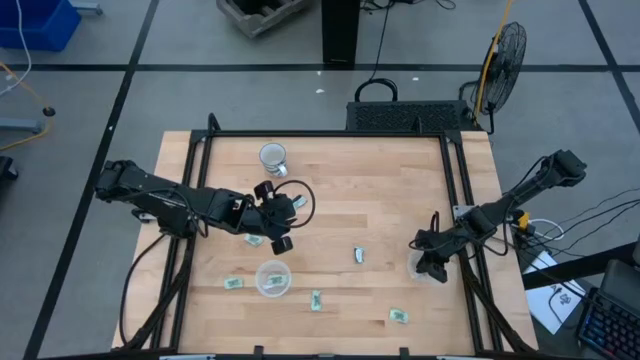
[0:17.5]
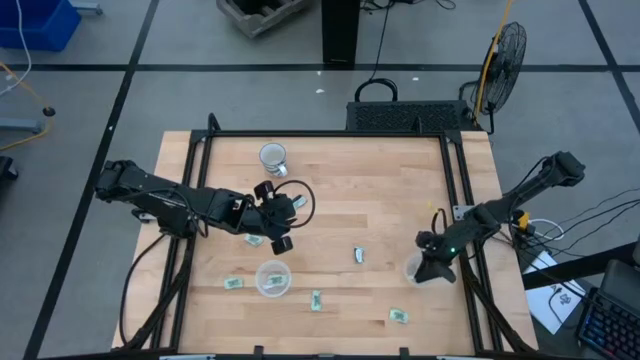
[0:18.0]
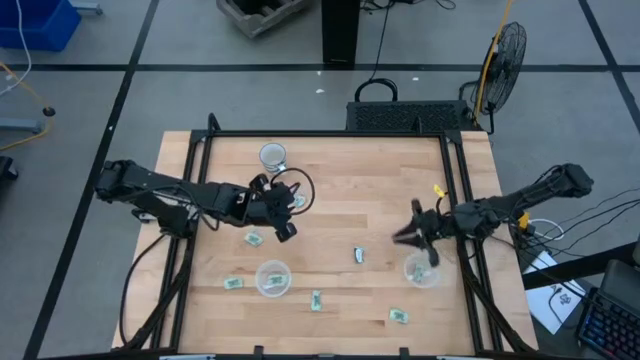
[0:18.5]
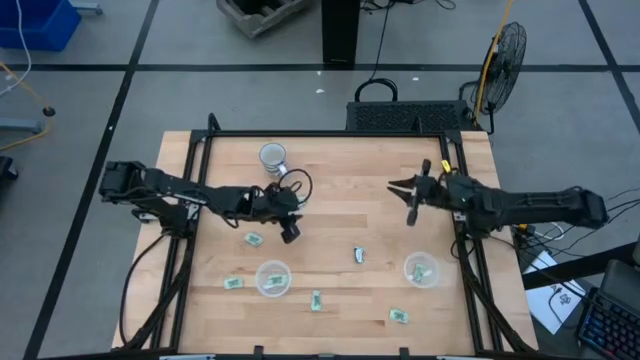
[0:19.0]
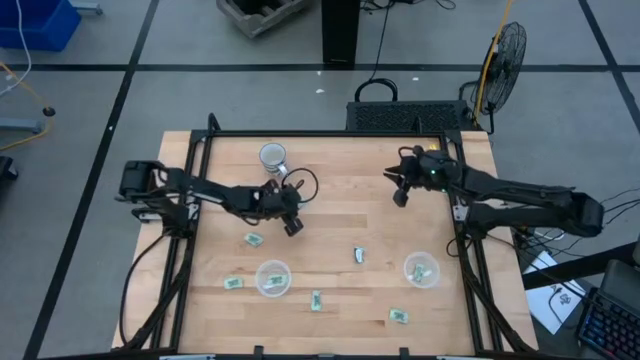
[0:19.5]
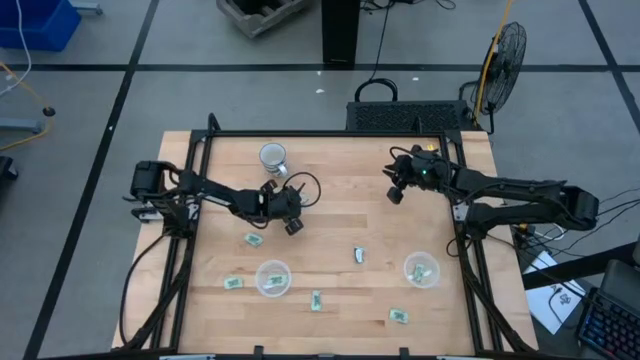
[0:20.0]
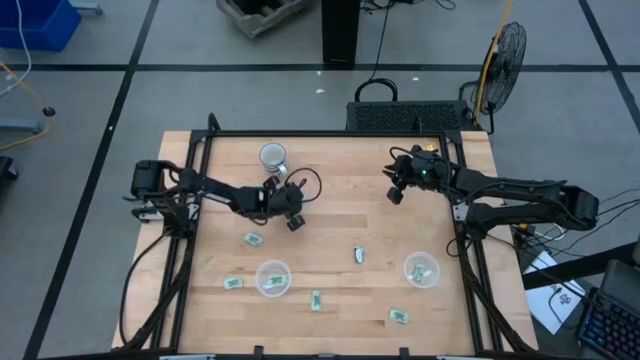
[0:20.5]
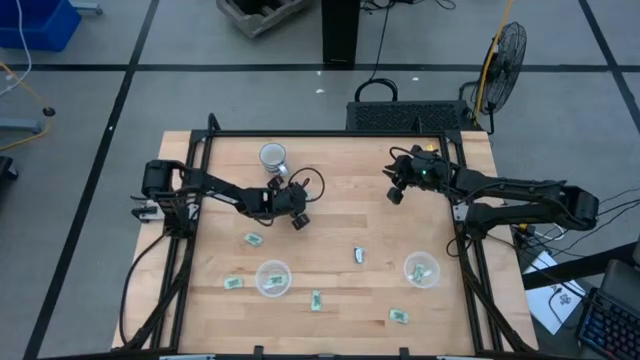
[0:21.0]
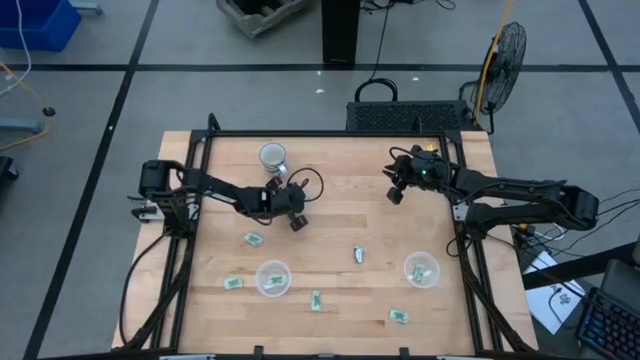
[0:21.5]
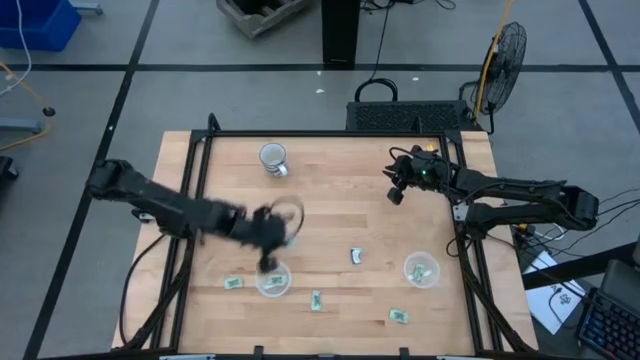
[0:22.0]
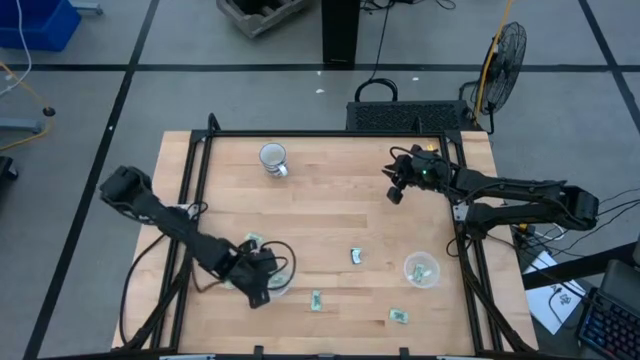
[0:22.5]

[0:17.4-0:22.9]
Task: Pick and place items into bin
Put the stevia packet into the left transparent bin

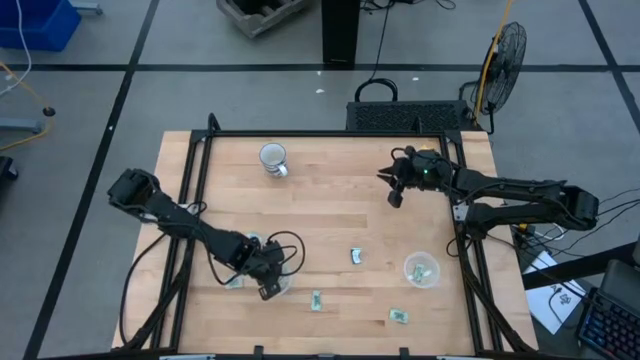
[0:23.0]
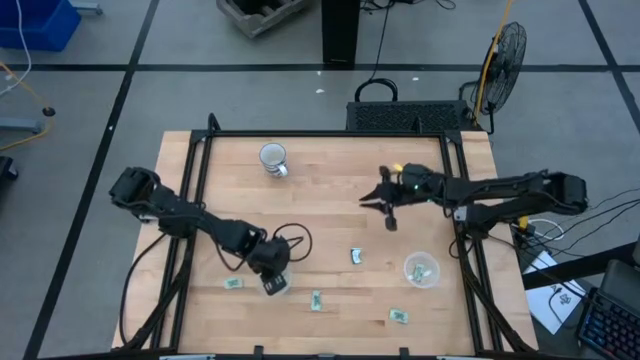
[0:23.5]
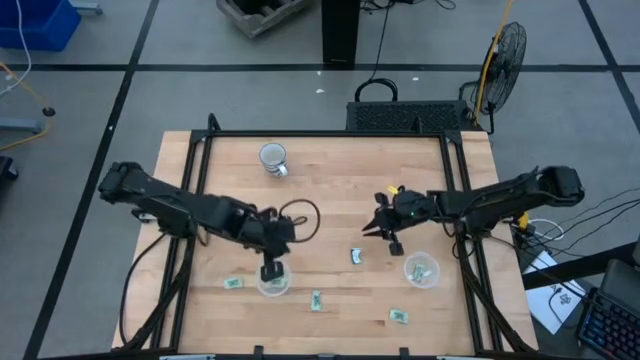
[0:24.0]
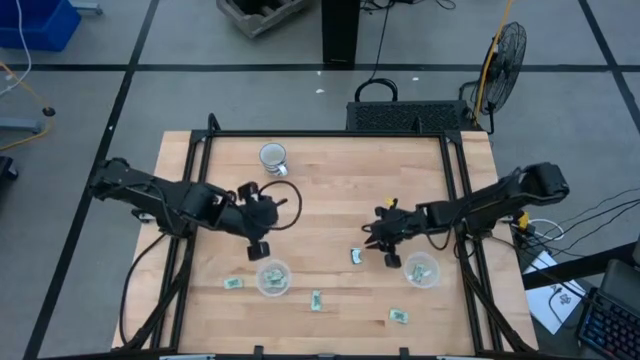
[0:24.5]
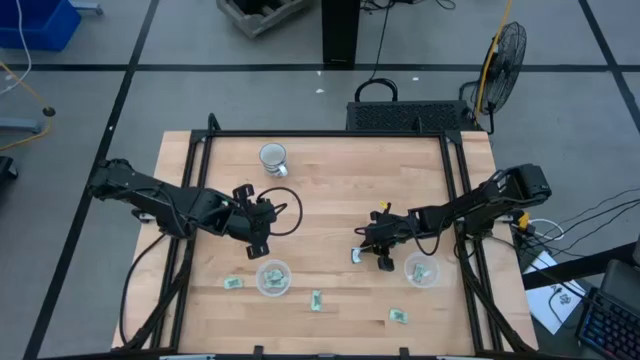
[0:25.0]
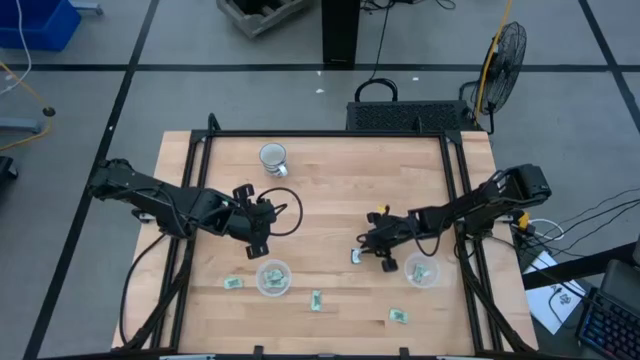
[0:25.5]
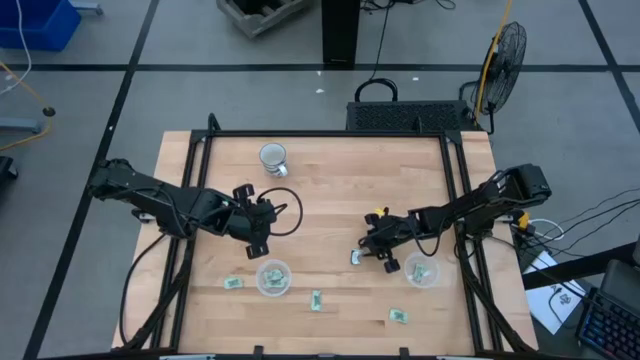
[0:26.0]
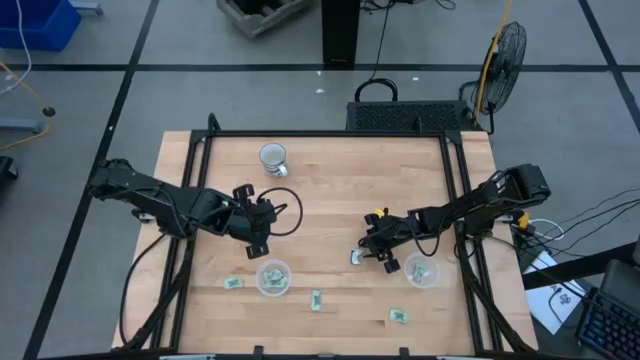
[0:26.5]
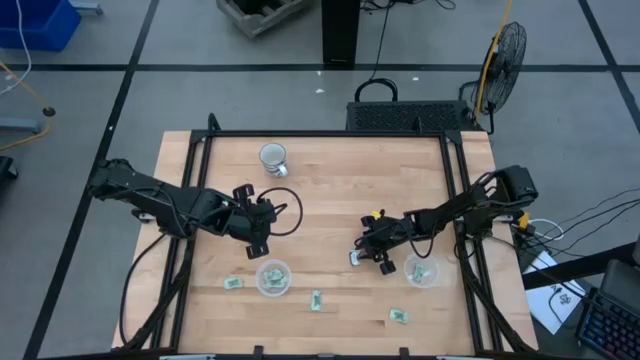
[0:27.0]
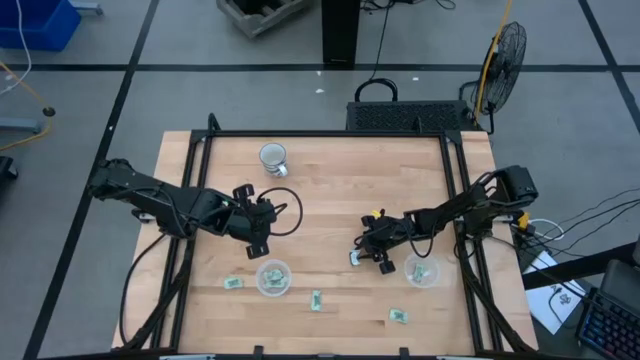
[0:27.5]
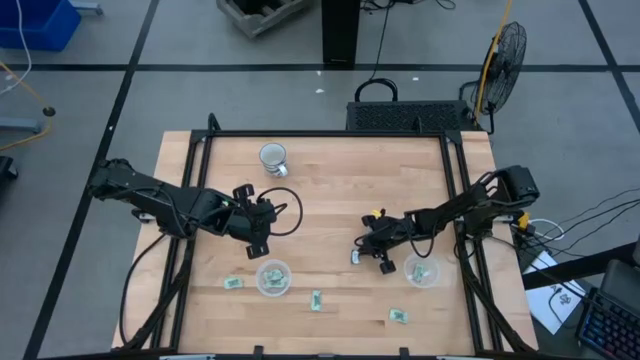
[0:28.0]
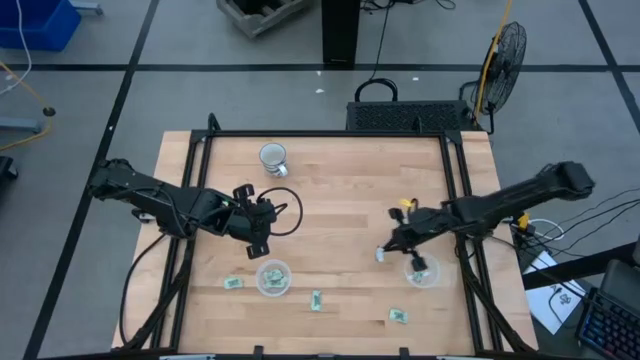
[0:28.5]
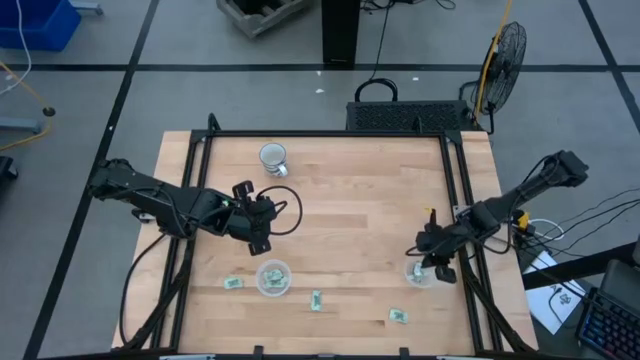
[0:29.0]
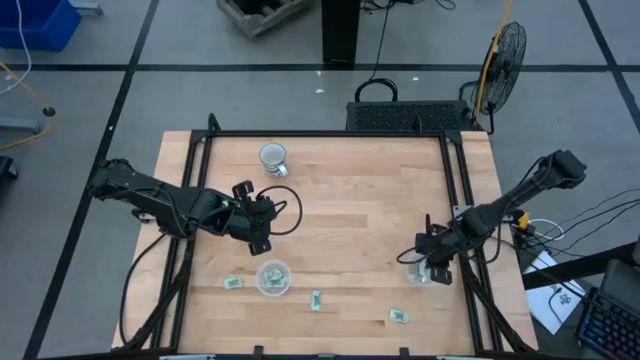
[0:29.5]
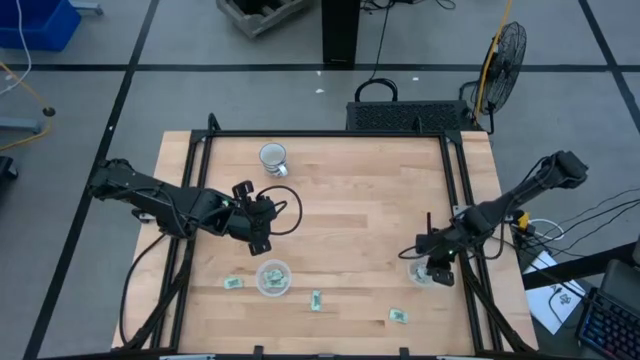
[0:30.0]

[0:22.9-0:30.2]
Put the truvia packet into the right transparent bin

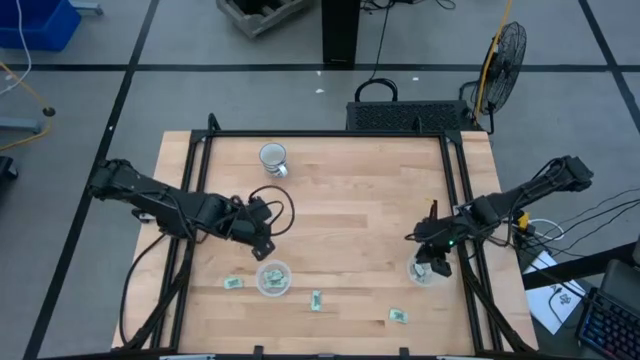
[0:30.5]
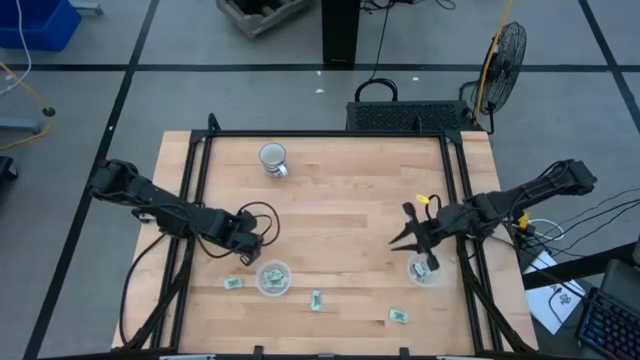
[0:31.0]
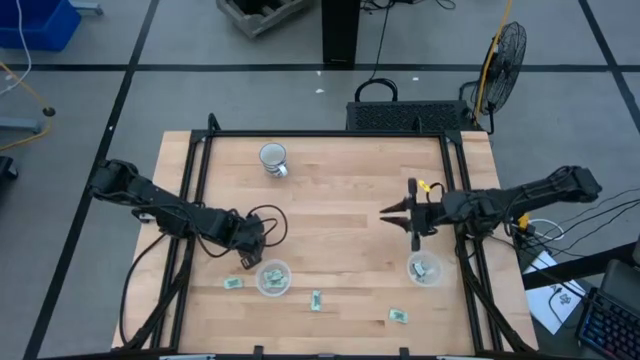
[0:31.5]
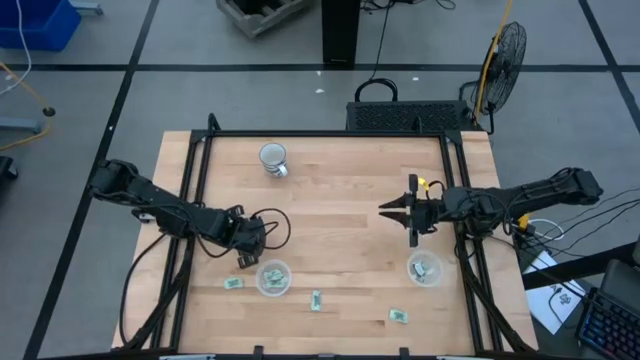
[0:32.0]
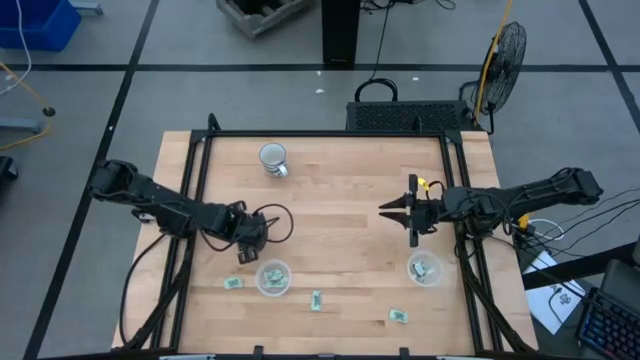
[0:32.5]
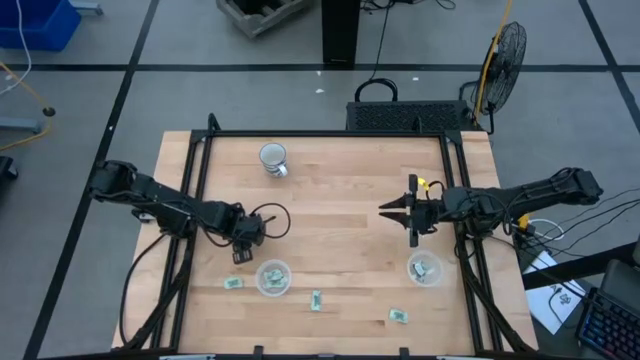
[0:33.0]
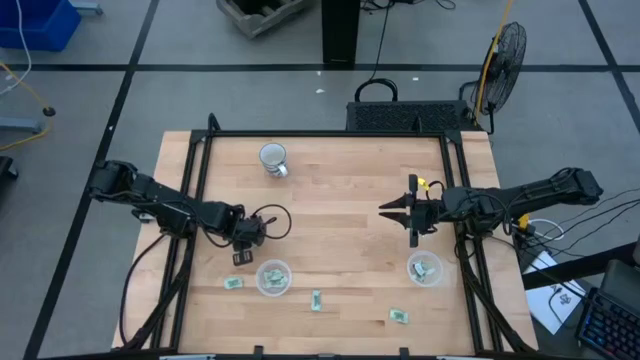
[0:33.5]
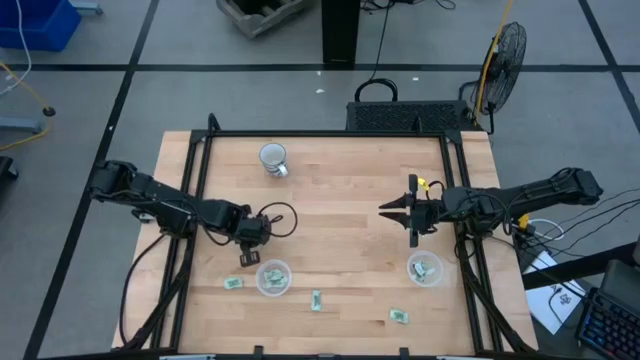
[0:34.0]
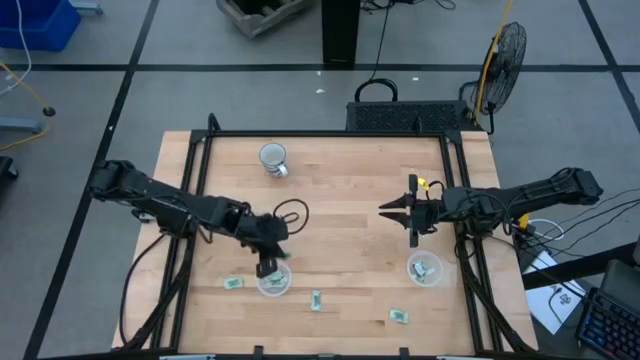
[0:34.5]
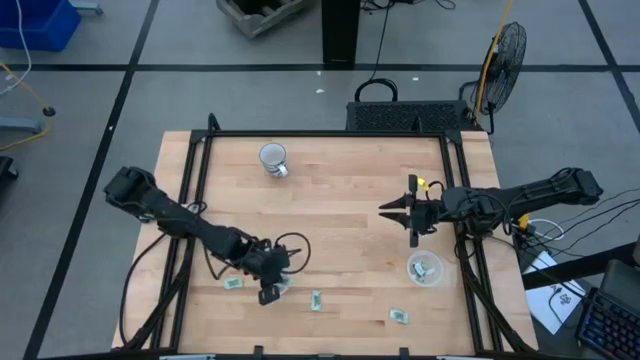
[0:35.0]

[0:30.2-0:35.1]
Put the stevia packet into the left transparent bin

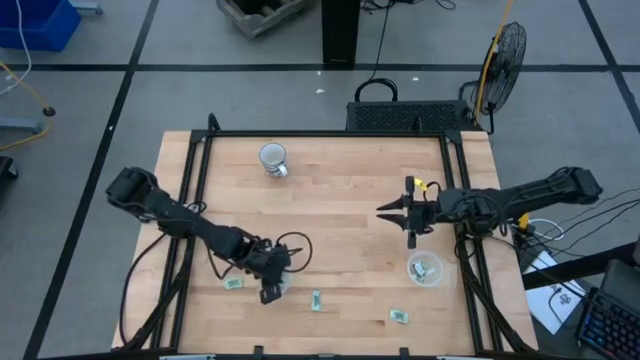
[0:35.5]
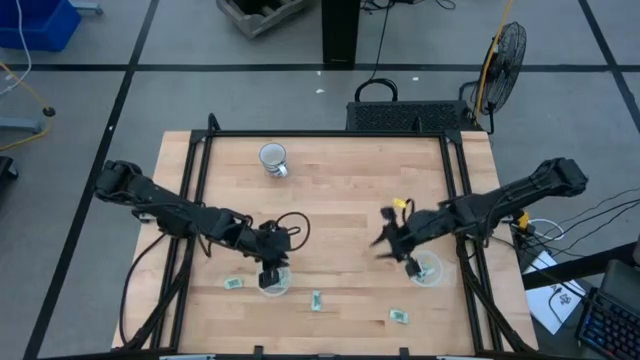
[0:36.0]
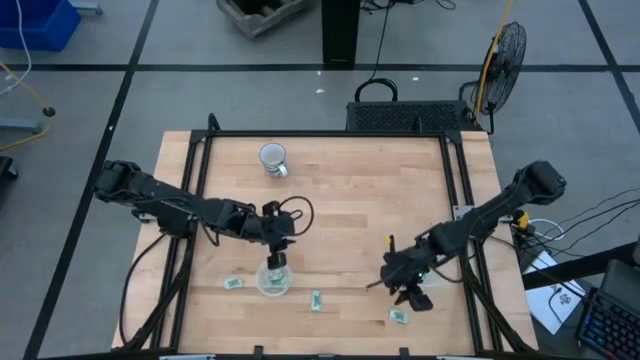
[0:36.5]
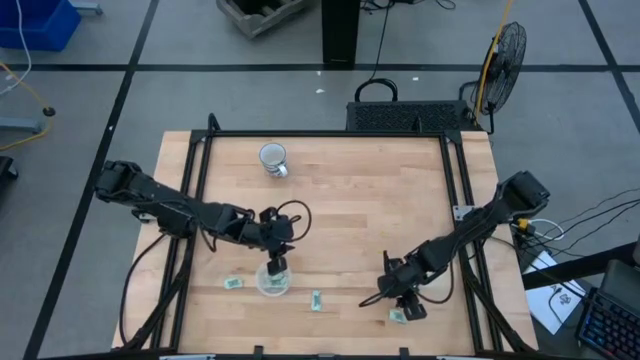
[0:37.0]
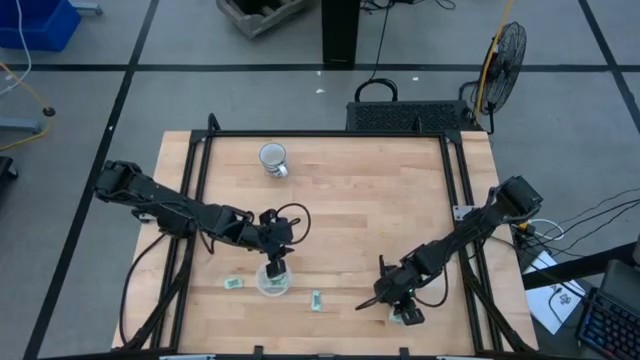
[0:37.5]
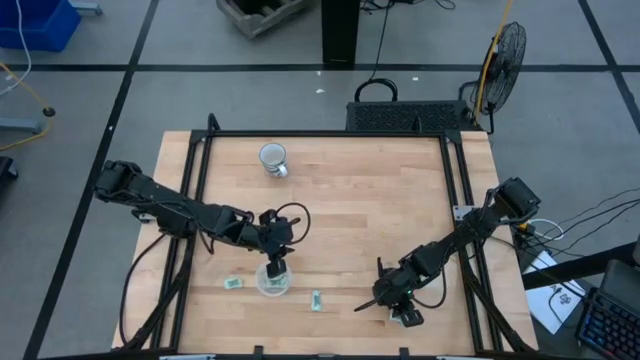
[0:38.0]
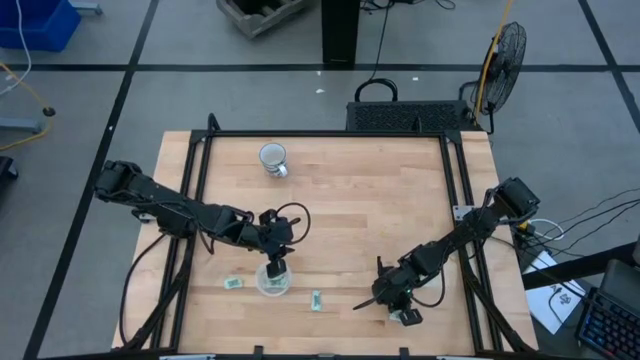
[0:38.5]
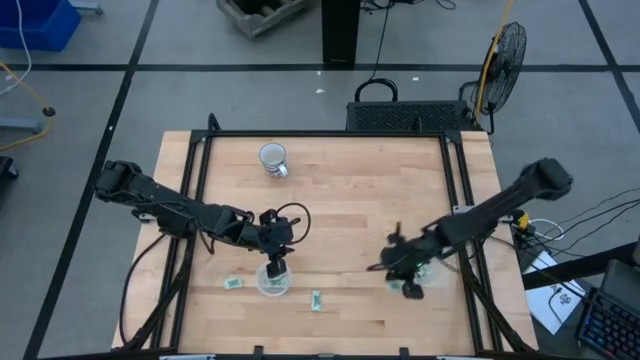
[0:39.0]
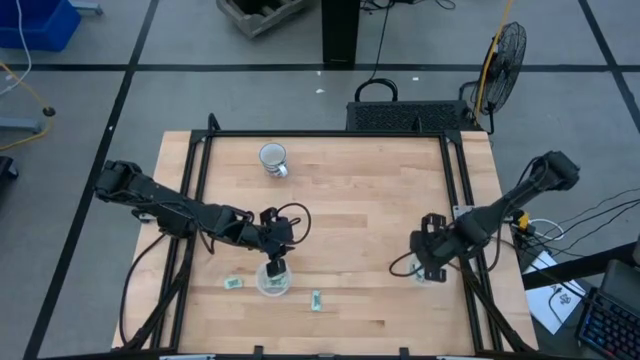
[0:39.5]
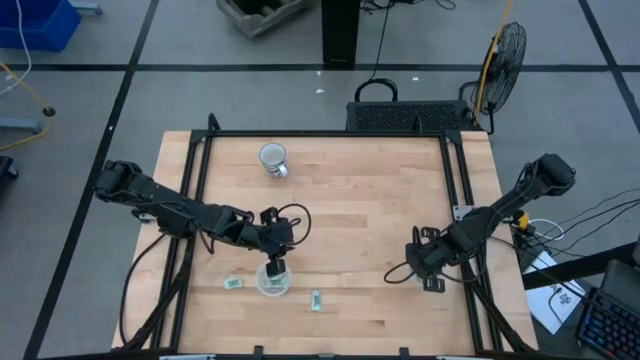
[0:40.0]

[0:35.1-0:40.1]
Put the stevia packet into the right transparent bin
